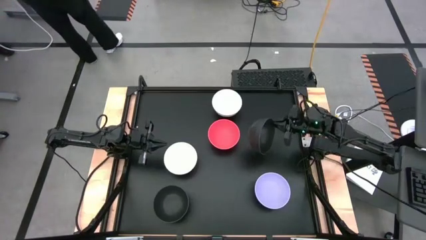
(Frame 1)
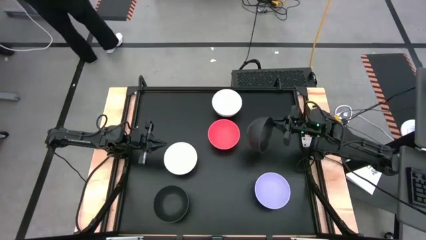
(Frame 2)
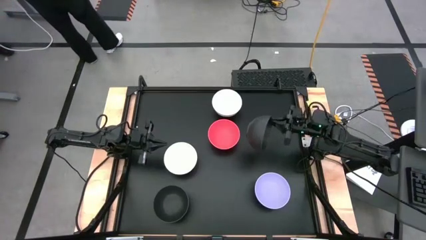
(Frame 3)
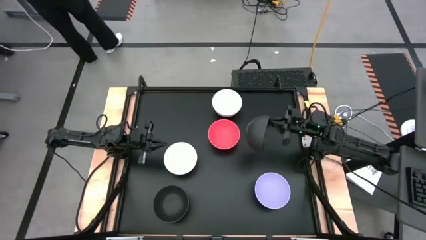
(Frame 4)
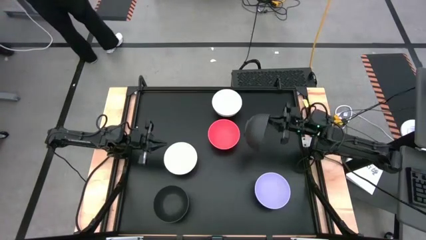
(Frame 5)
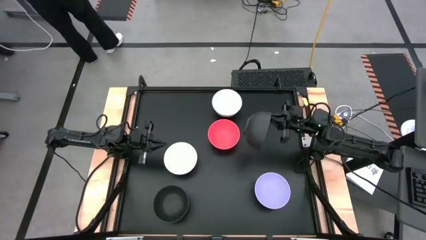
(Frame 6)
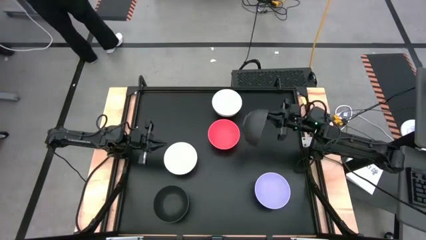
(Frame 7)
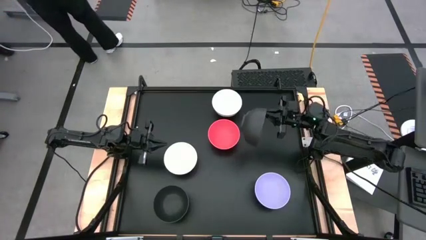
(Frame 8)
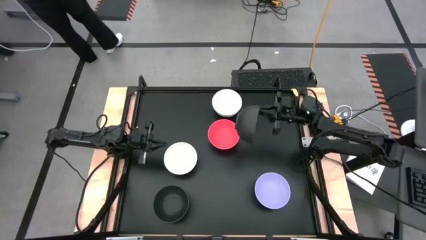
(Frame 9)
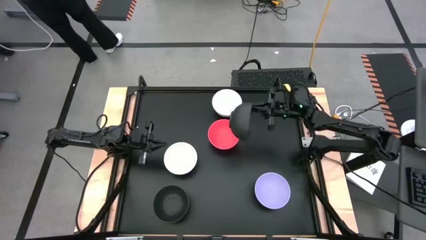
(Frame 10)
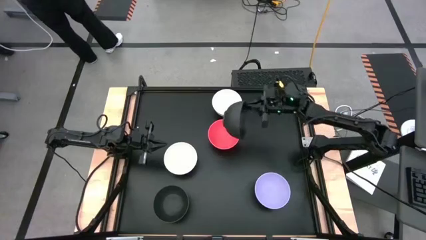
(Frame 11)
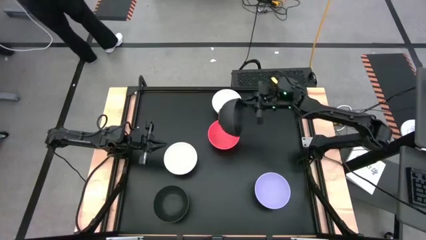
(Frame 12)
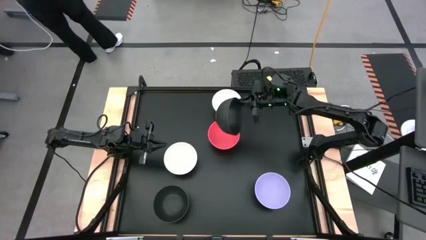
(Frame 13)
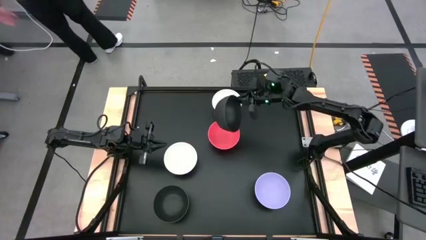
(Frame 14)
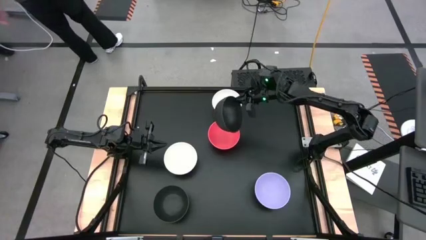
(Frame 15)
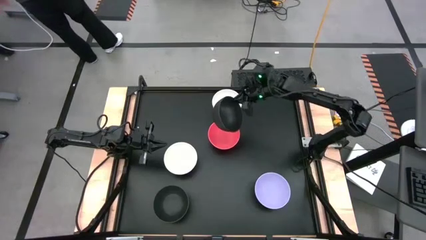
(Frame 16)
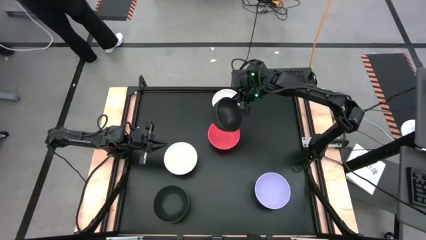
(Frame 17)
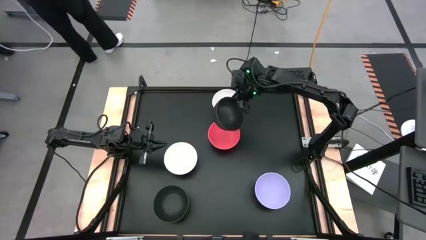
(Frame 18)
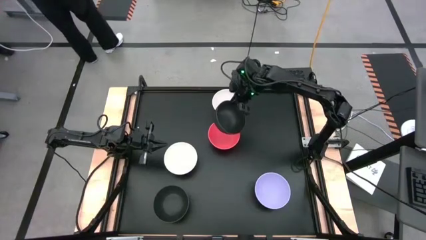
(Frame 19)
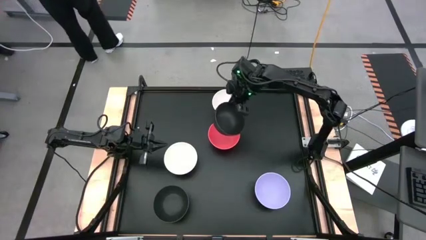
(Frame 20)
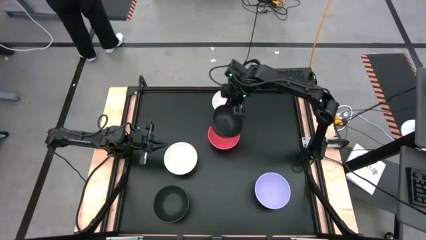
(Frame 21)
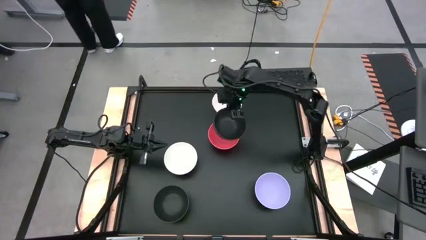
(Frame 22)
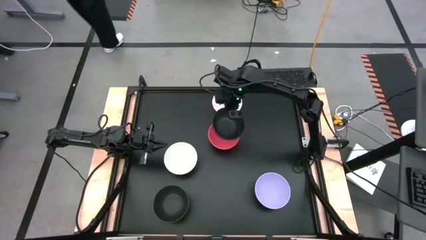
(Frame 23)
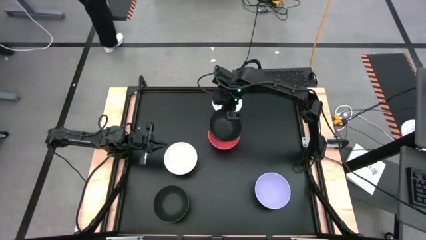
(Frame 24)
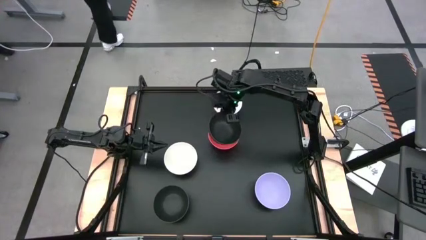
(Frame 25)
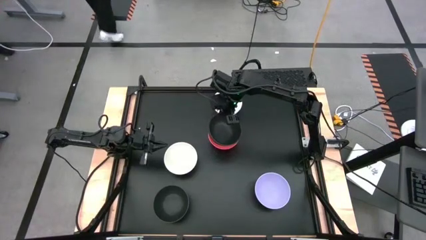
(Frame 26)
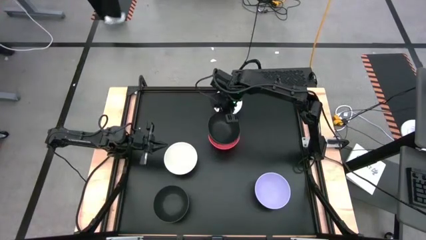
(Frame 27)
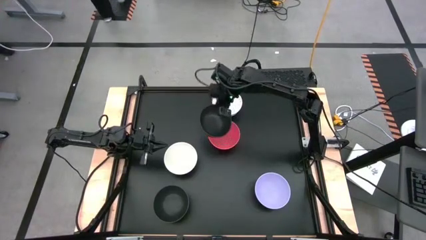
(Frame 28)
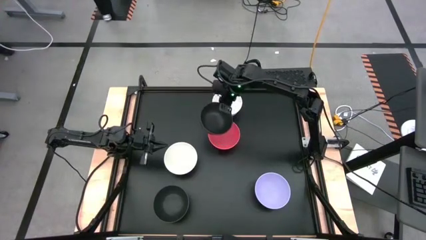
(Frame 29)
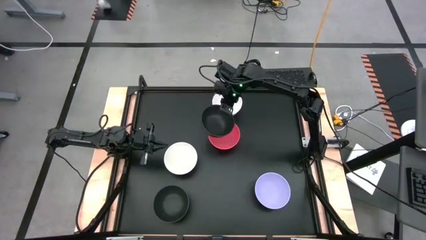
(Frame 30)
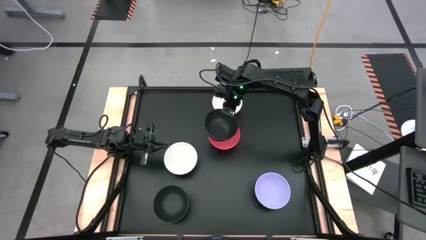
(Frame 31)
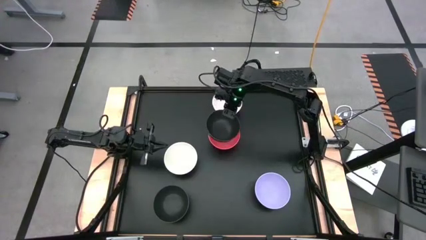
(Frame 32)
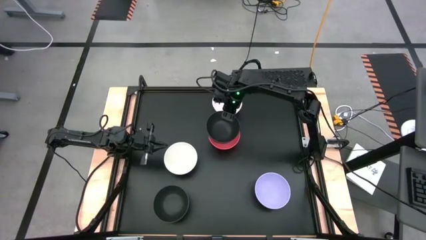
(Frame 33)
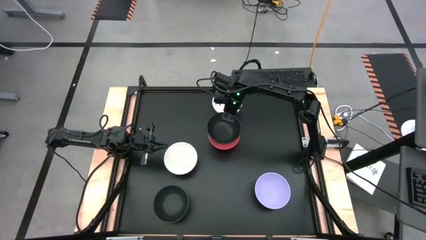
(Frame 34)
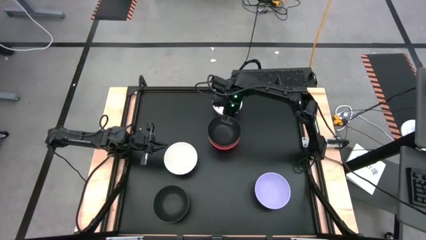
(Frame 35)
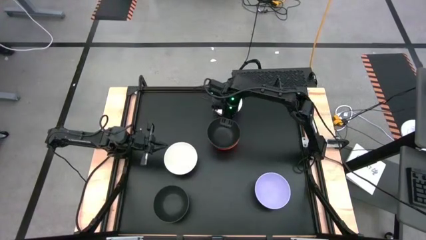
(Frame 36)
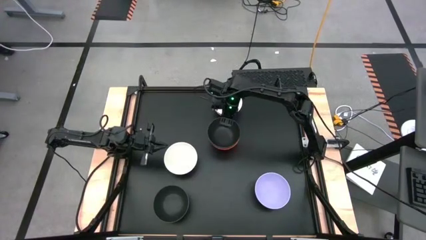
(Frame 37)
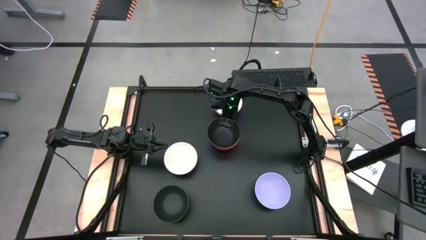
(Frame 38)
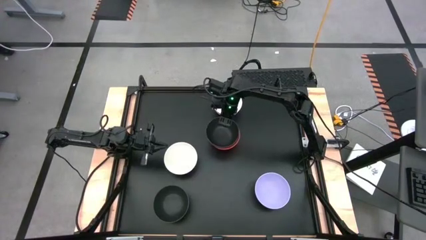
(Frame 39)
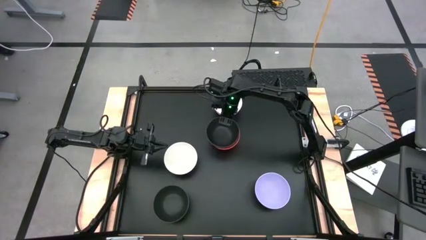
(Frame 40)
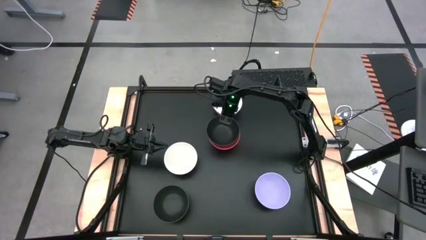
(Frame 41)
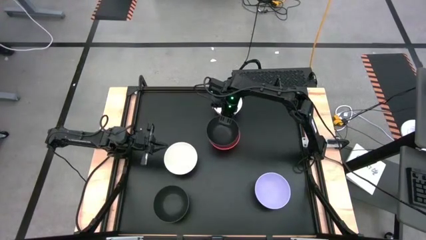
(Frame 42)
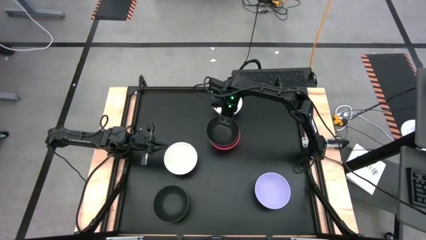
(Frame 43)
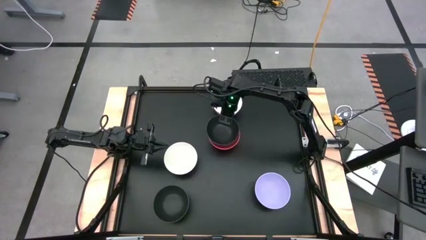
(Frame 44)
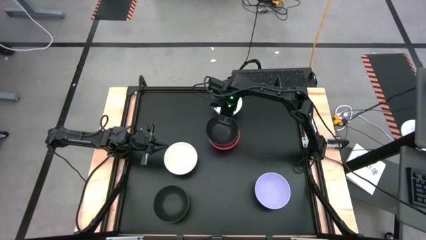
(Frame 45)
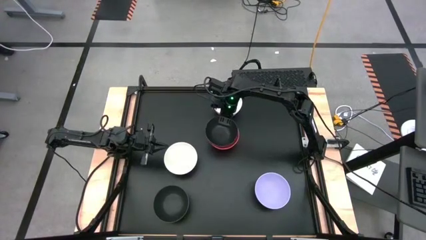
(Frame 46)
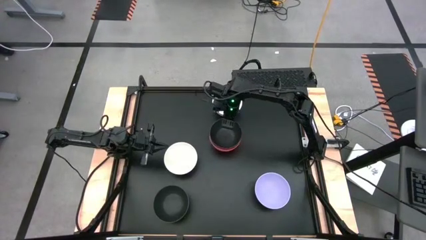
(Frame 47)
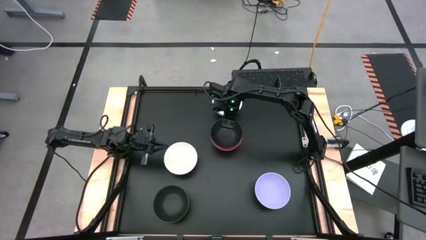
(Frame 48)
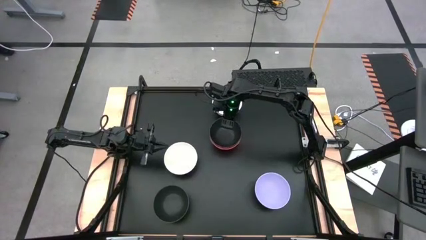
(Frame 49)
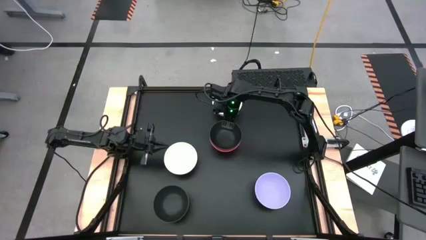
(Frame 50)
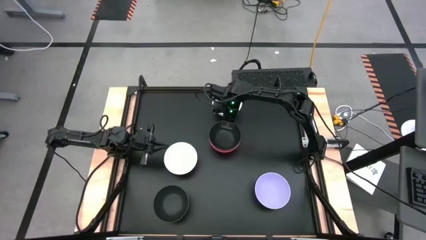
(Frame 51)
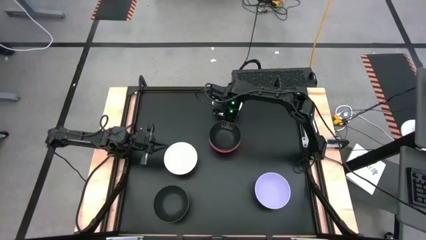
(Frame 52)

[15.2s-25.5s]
Task: Nest bowls inside each other
Stack the right black bowl on top of the red bowl

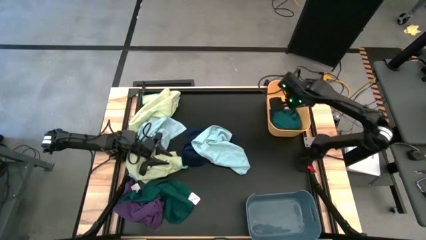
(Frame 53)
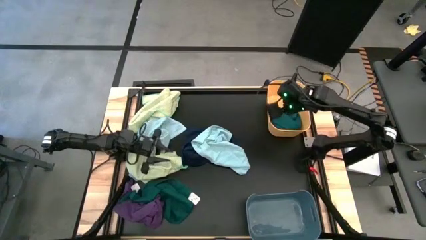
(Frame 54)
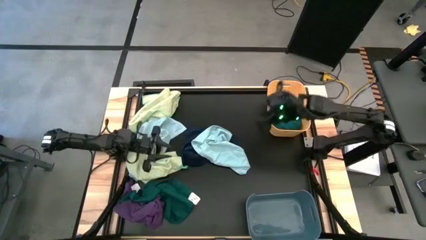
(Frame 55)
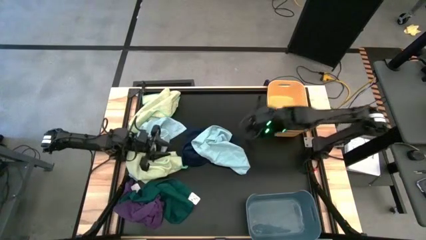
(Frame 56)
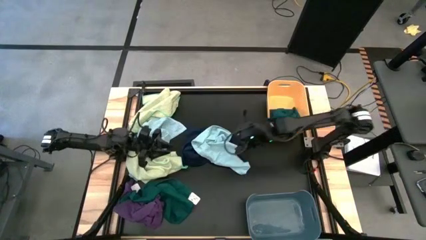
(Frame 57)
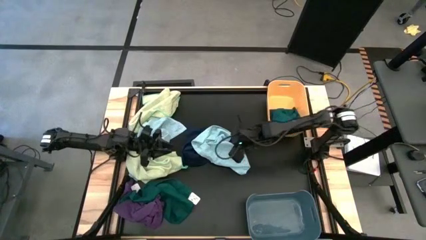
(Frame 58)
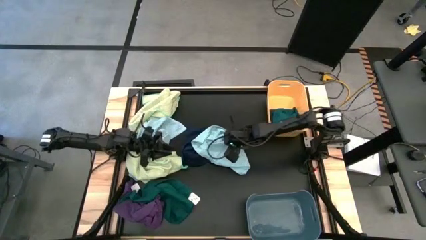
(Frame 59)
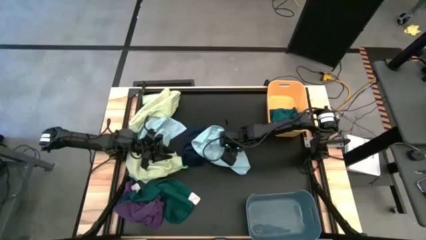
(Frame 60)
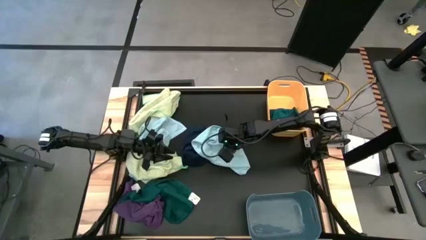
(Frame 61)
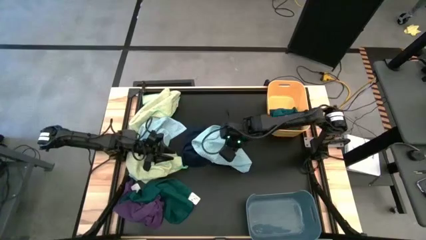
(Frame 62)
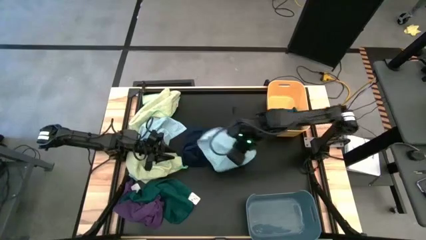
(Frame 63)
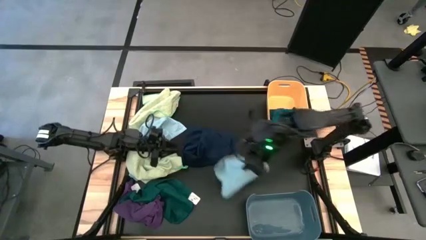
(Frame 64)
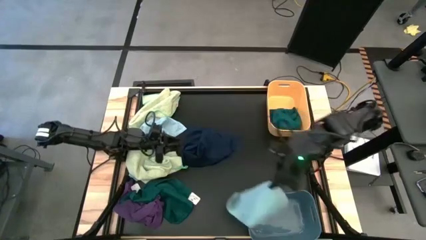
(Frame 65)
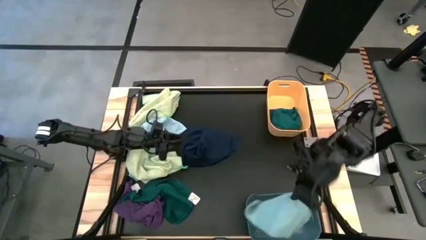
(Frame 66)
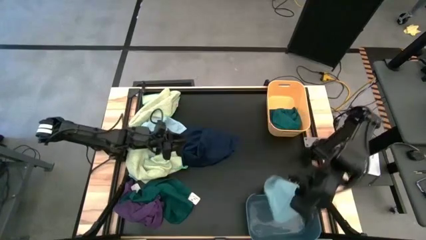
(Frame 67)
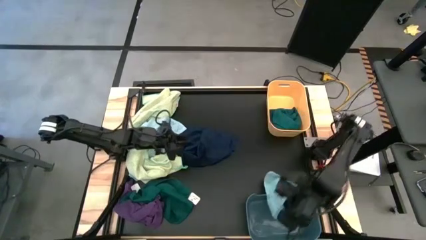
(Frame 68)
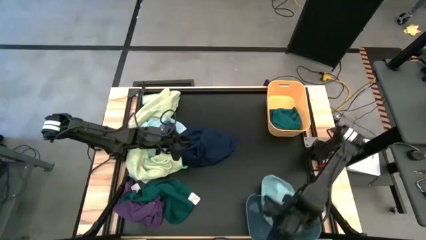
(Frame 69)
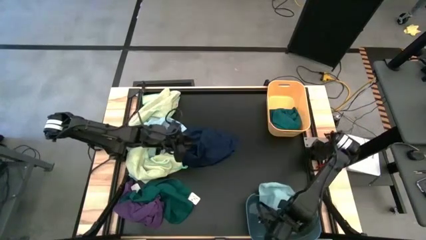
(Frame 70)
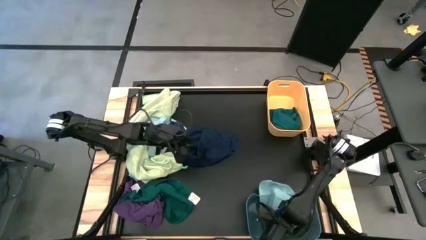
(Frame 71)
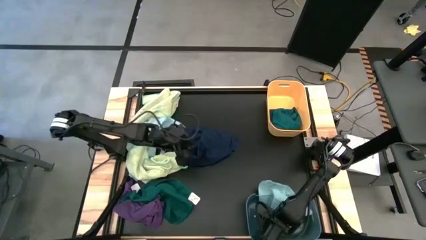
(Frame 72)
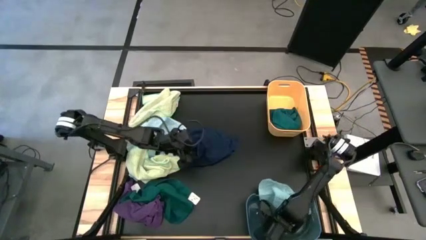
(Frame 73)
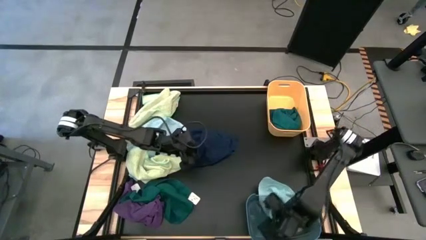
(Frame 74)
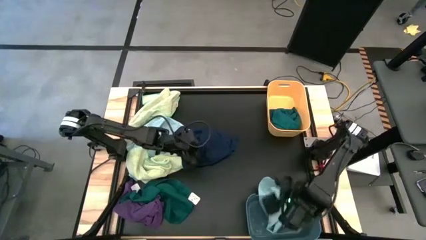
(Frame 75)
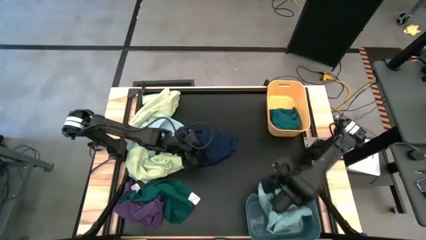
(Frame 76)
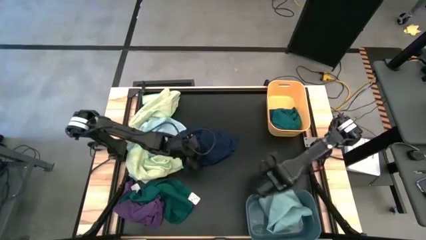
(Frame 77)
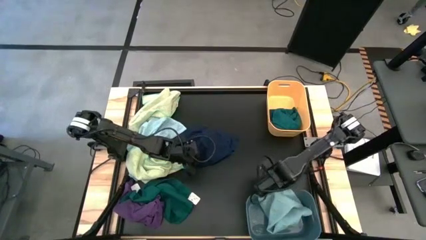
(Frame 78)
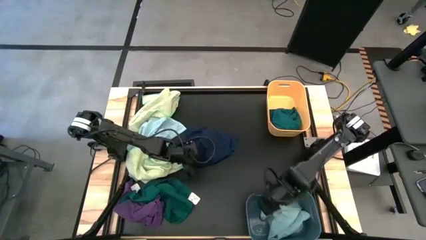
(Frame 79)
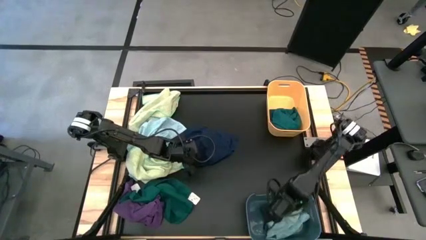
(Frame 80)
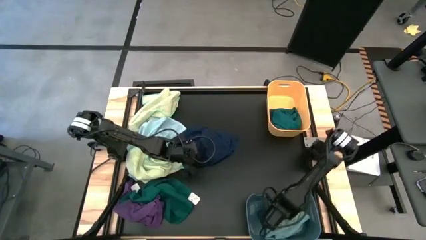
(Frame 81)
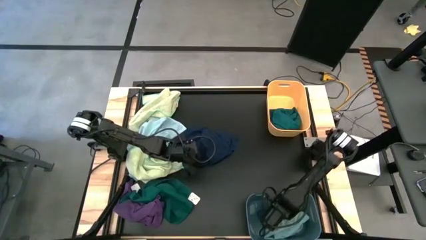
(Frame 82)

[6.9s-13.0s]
Task: Sort towels by color in basket
Put the light blue towel into the blue bin
